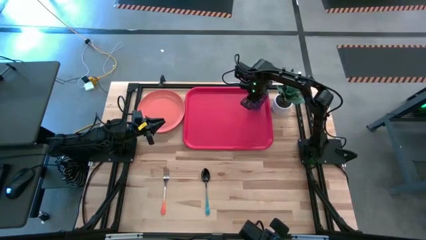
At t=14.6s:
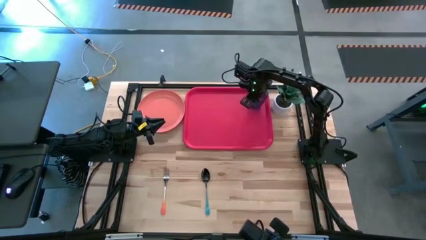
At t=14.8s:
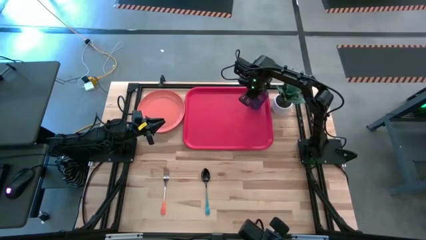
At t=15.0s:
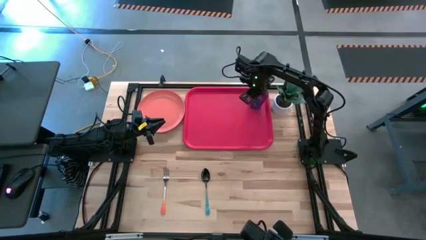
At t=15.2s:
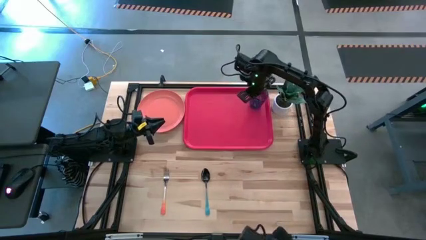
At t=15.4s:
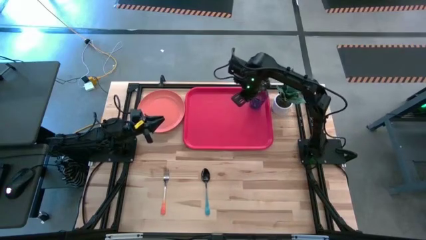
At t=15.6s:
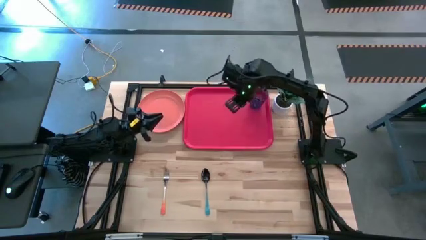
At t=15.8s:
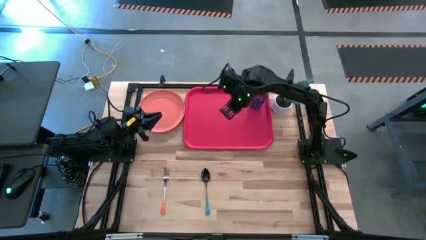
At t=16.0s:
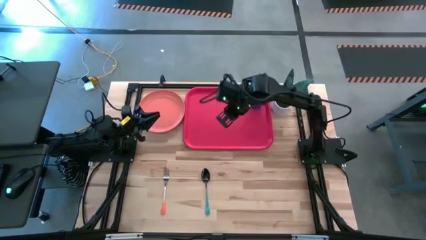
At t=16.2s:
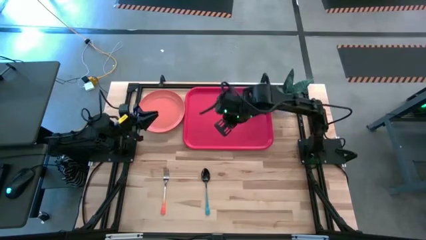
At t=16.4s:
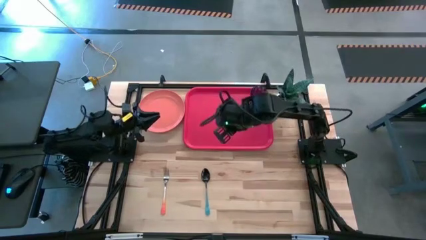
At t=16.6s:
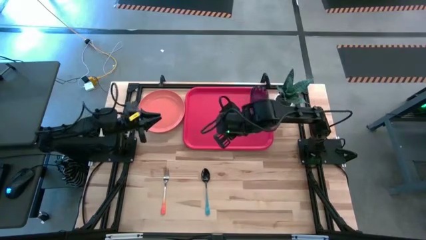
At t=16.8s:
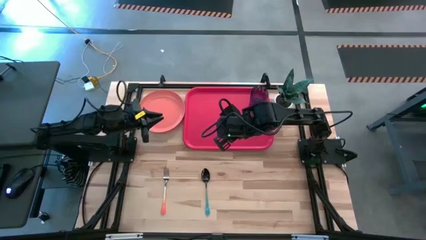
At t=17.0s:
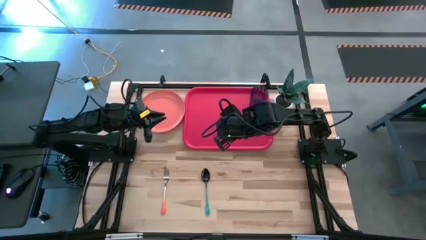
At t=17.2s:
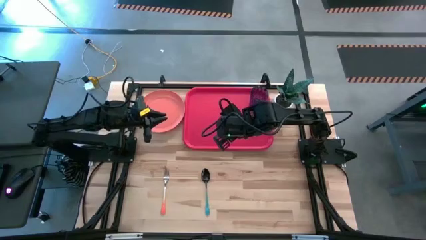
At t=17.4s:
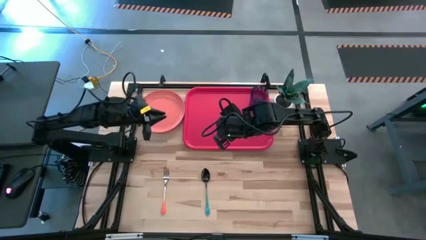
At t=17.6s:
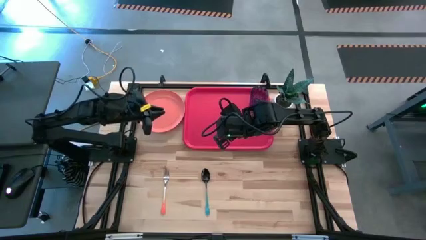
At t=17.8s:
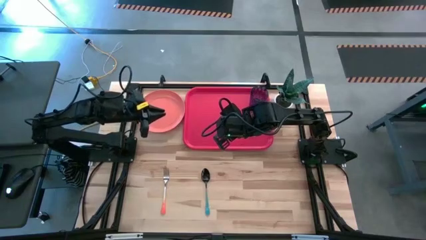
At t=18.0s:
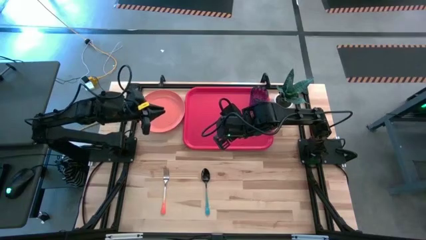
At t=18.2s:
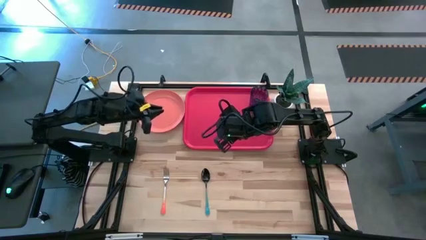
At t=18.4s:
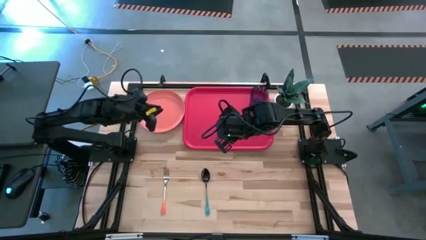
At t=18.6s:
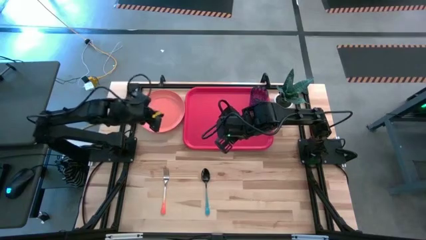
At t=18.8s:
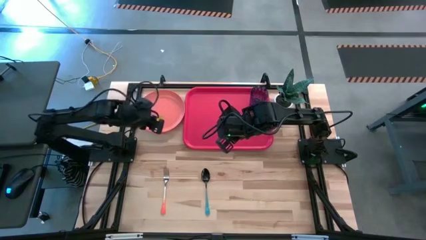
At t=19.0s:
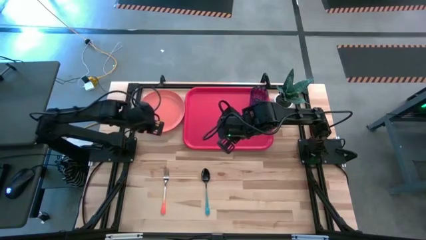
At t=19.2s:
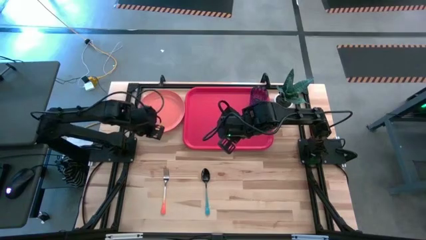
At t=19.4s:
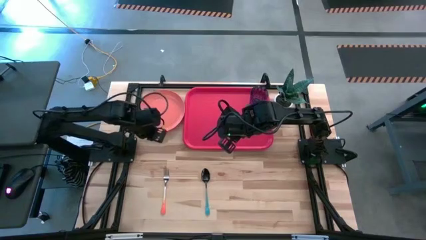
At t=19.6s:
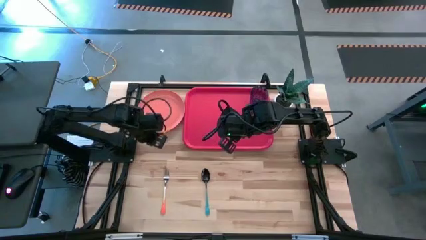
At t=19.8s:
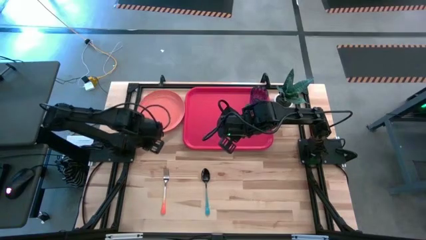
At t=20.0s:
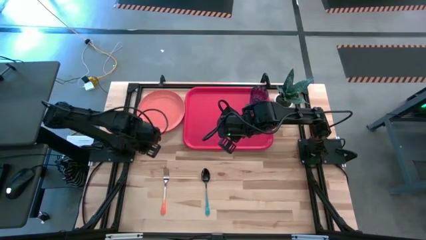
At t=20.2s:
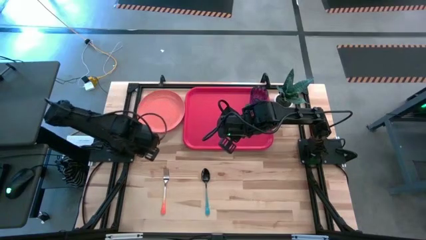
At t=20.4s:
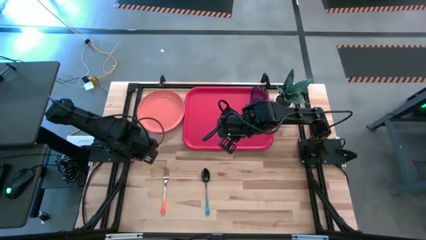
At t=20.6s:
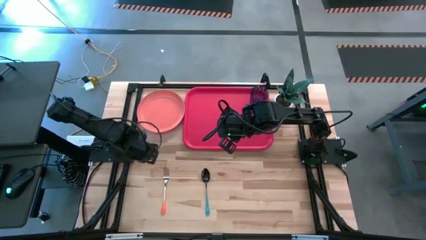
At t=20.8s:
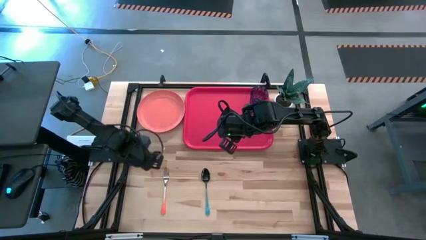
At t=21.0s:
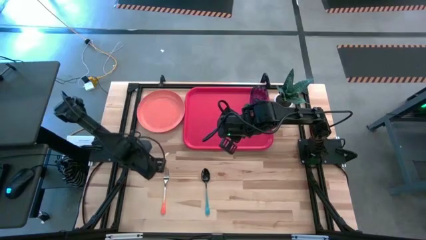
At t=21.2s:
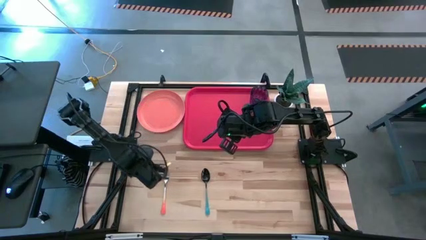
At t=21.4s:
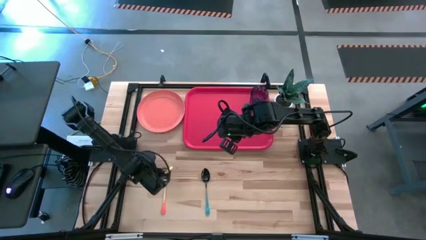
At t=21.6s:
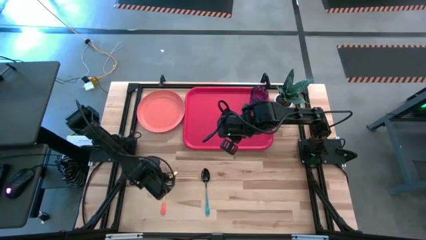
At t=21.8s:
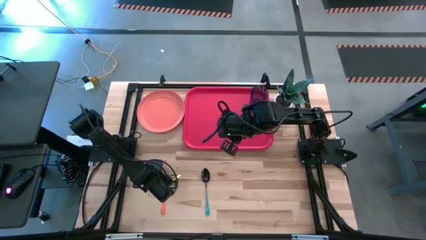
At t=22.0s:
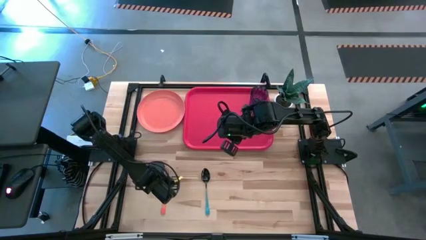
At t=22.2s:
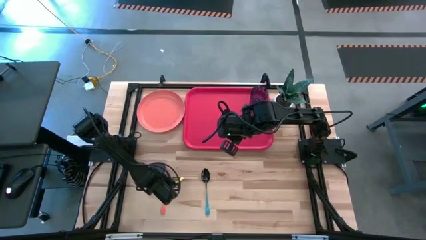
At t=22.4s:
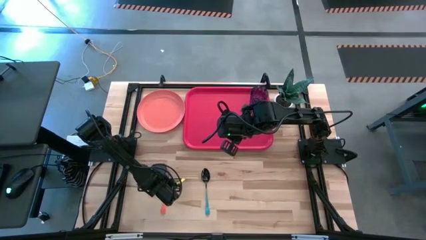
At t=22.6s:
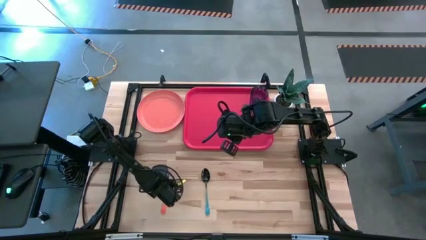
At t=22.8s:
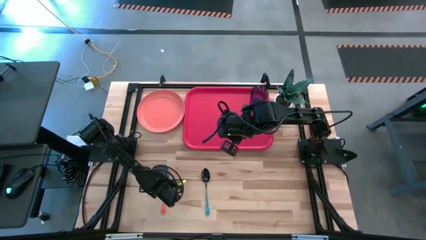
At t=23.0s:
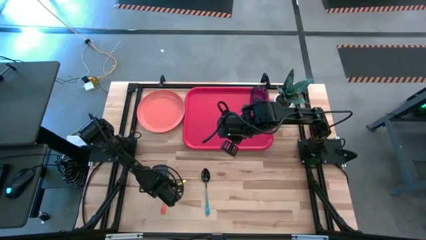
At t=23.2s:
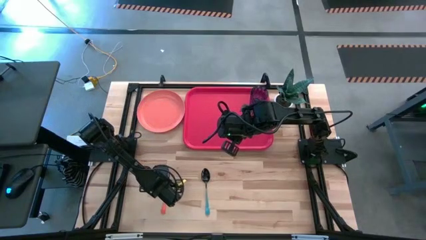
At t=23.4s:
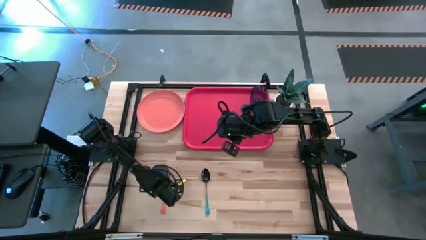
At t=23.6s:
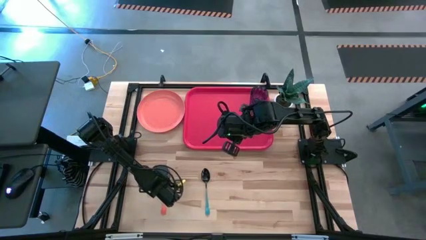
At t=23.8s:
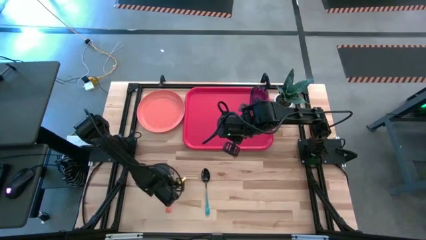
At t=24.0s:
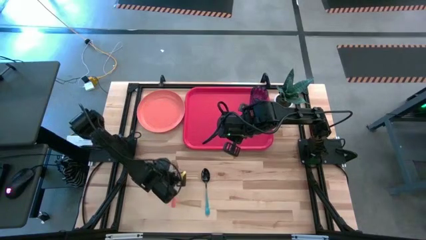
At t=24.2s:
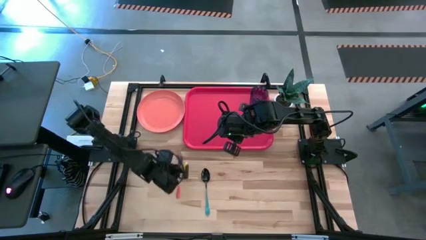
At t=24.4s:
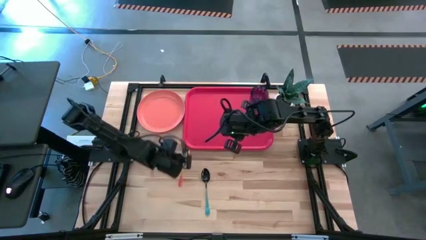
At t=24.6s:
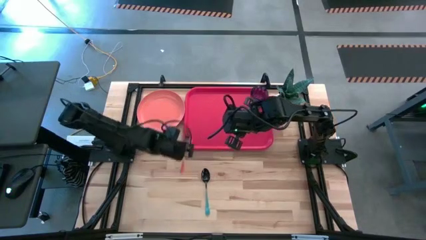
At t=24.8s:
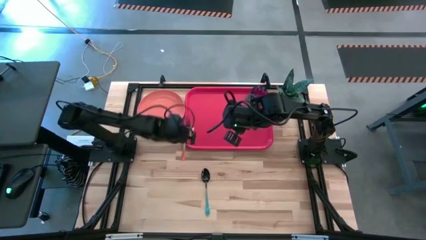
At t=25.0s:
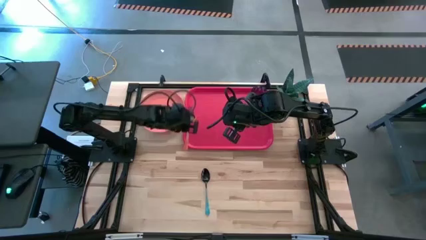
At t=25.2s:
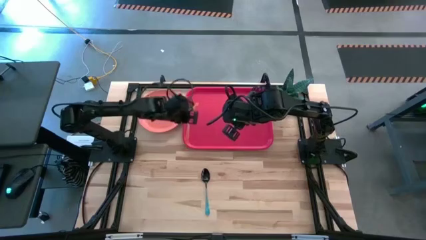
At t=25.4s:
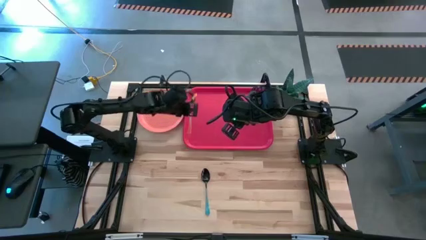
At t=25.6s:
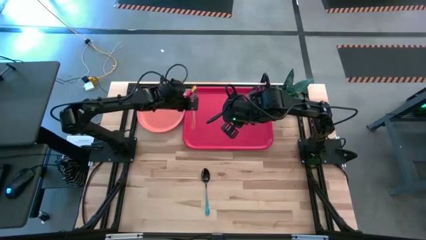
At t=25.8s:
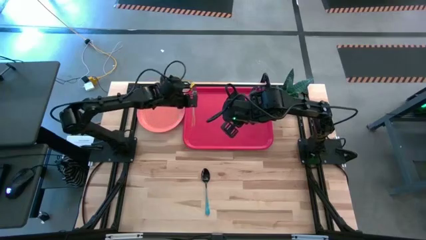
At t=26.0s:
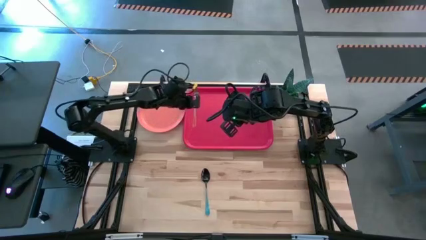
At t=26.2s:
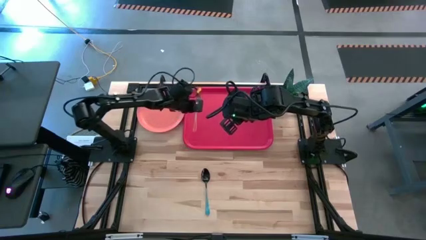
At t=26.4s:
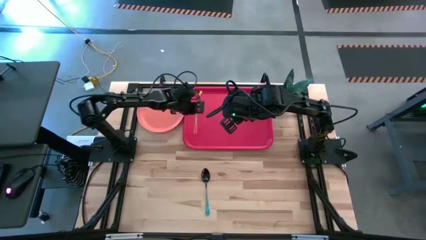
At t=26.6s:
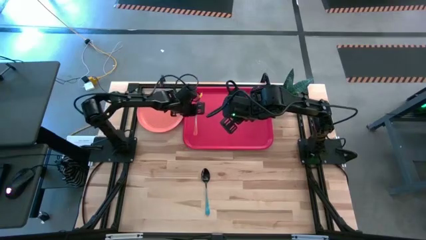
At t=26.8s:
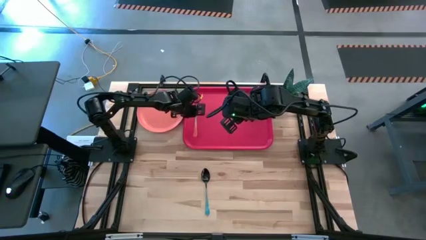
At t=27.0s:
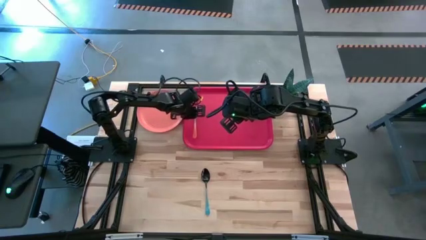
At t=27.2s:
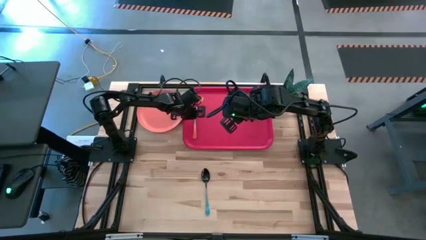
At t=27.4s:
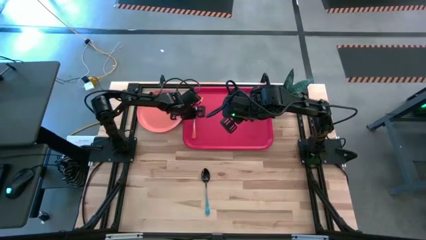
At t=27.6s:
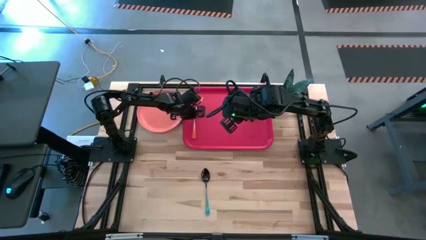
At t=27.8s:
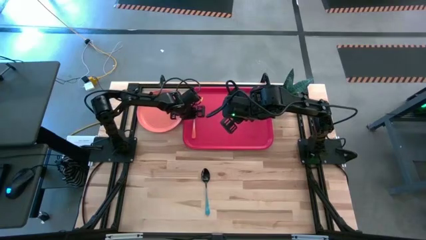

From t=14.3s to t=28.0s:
Task: Pick and place plate/cup/fork/spoon on tray
Put the fork on the left of the serving tray

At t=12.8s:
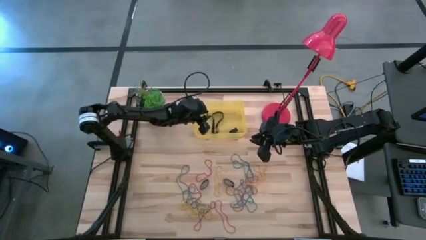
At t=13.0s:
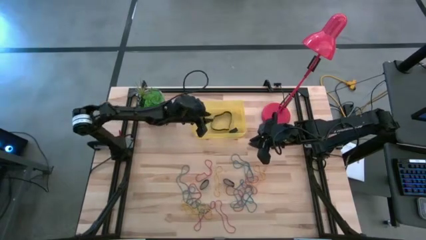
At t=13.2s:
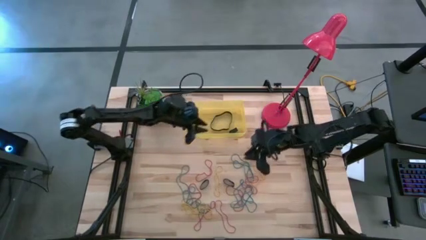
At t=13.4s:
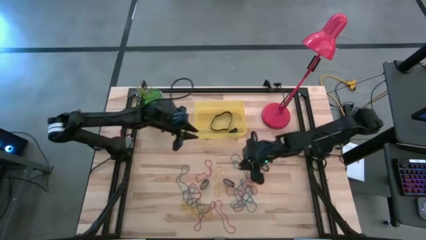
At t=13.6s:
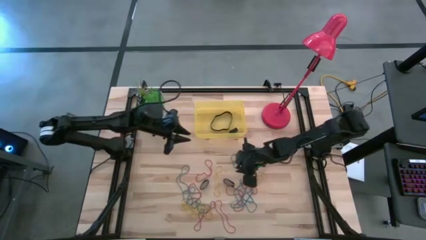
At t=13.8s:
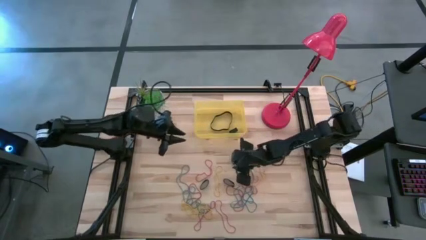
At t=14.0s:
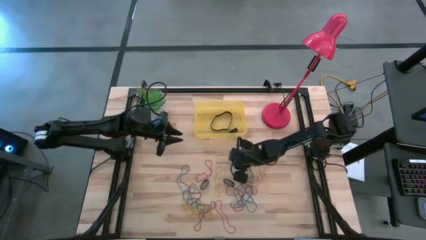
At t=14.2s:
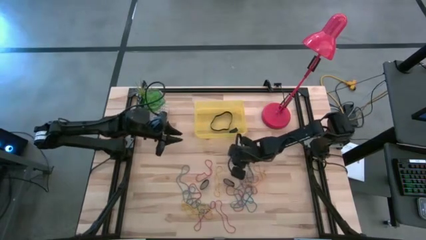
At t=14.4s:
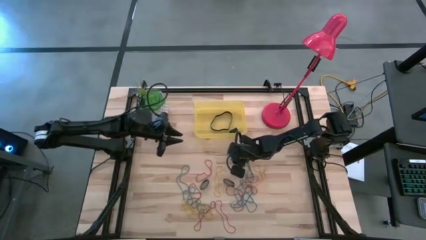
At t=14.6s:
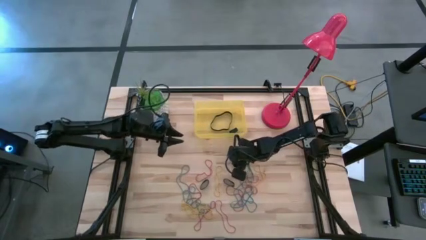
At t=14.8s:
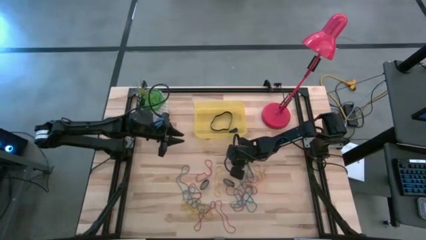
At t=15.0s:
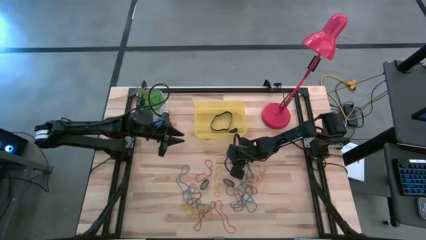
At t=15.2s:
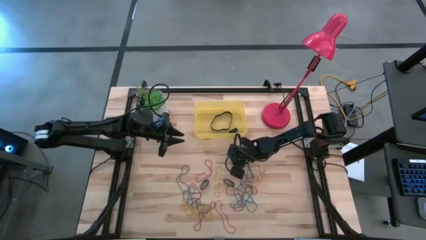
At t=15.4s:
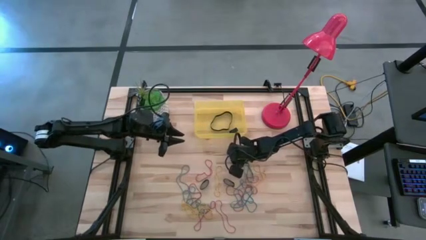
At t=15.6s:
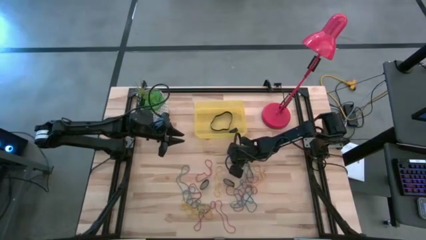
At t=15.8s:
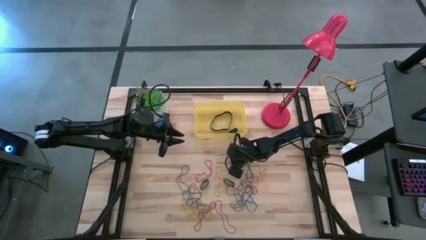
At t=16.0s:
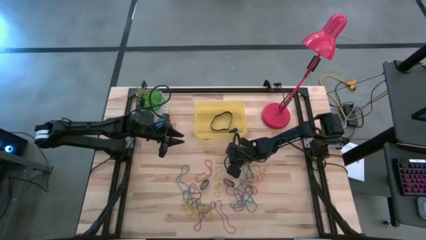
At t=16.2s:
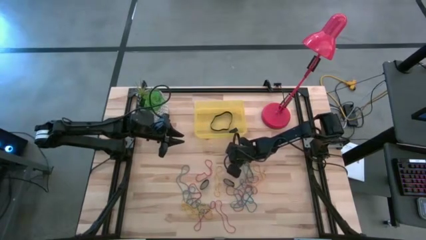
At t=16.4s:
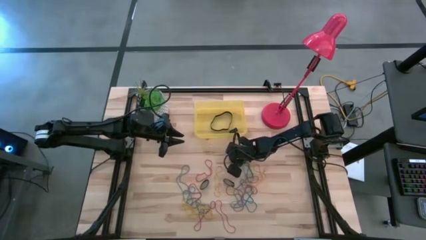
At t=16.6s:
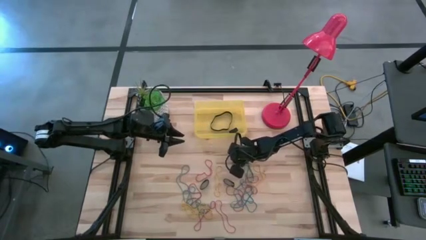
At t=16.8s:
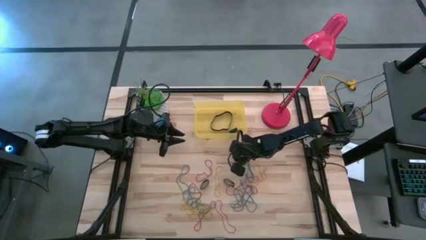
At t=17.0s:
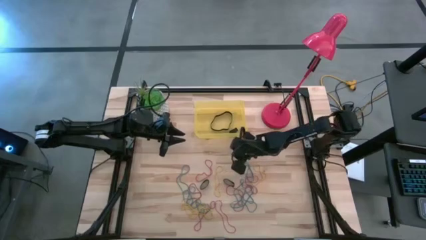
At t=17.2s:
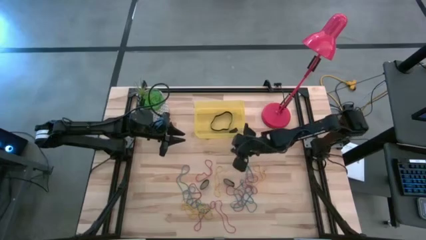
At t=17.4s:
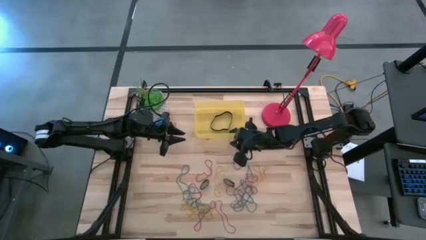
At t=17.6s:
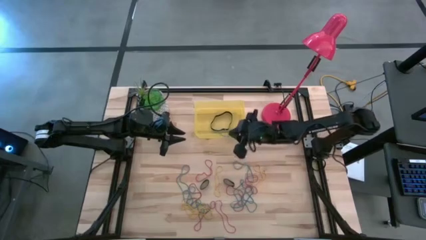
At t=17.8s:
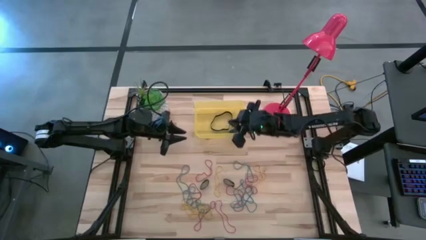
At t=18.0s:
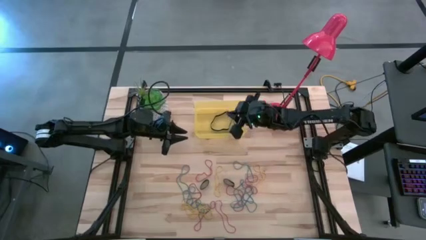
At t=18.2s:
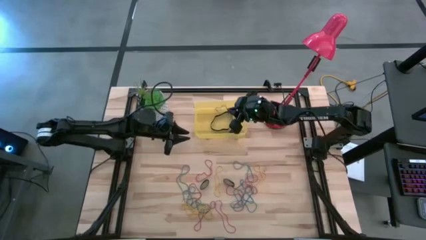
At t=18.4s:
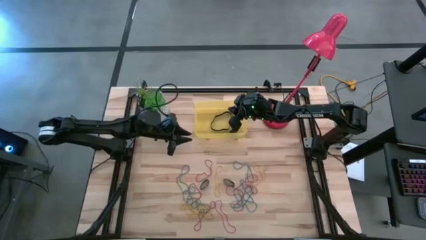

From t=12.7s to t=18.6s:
Task: Pick and place rubber bands into bin
Put the blue rubber band into the yellow bin
